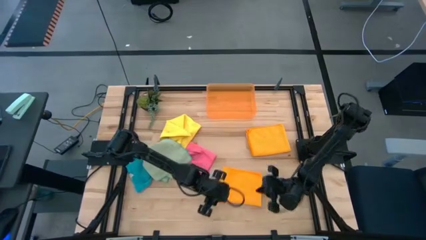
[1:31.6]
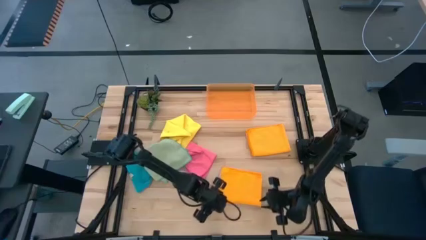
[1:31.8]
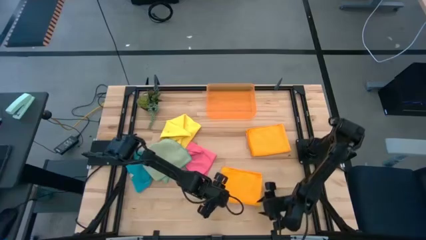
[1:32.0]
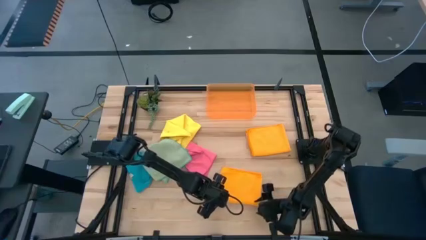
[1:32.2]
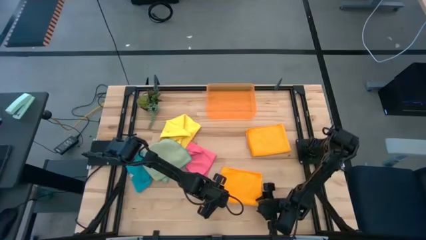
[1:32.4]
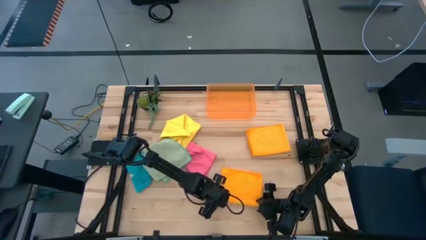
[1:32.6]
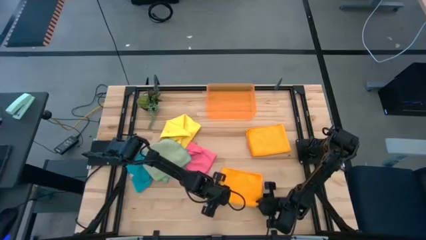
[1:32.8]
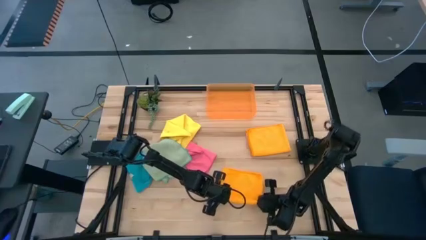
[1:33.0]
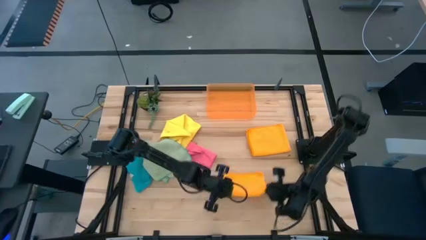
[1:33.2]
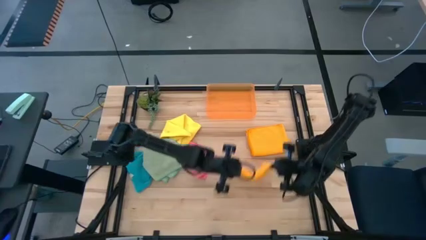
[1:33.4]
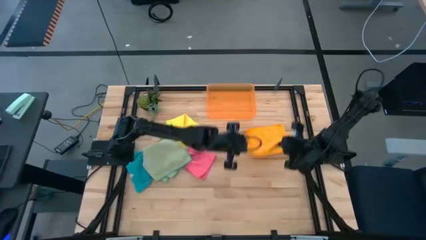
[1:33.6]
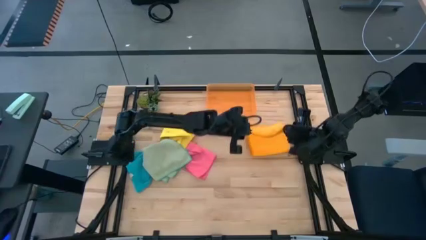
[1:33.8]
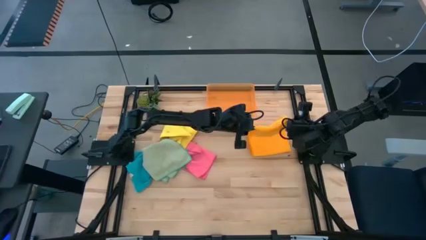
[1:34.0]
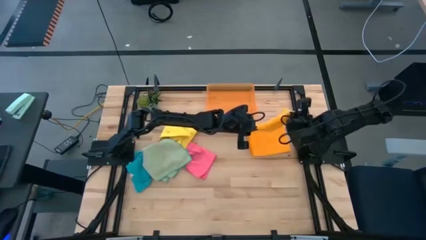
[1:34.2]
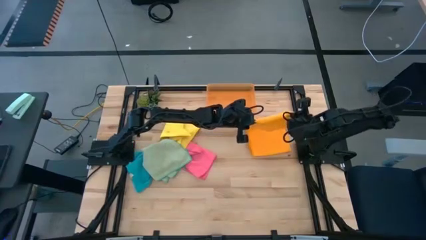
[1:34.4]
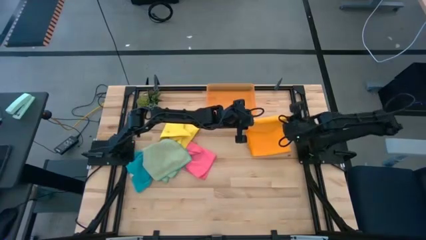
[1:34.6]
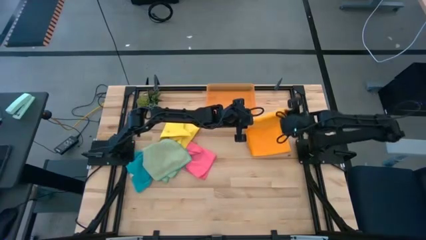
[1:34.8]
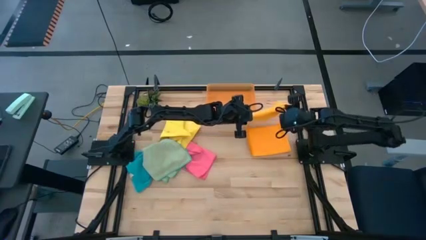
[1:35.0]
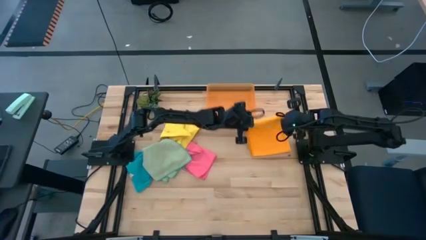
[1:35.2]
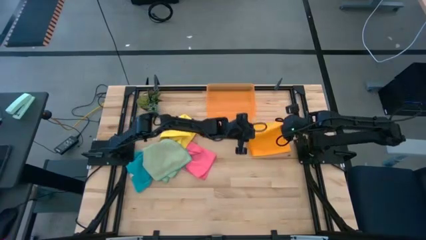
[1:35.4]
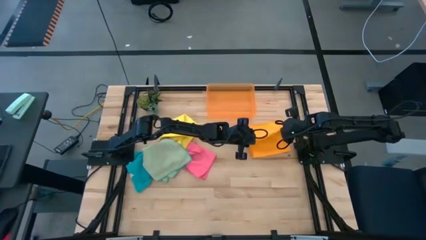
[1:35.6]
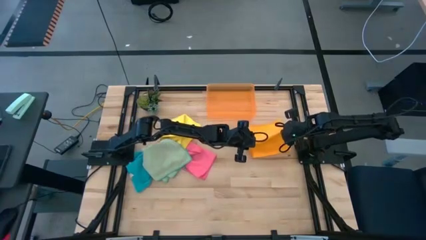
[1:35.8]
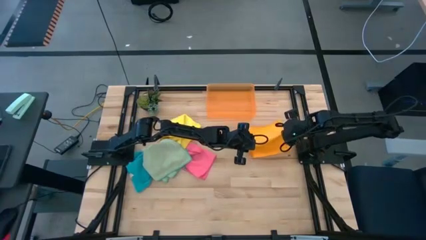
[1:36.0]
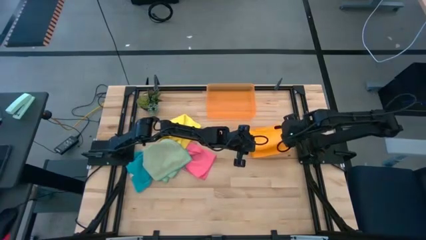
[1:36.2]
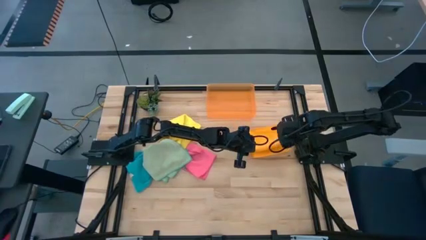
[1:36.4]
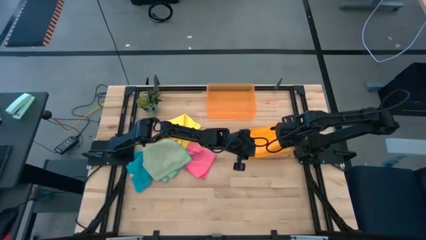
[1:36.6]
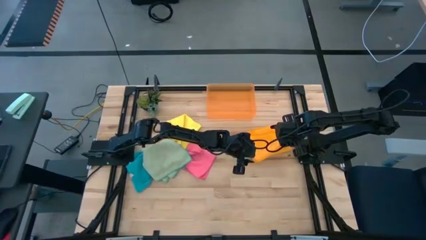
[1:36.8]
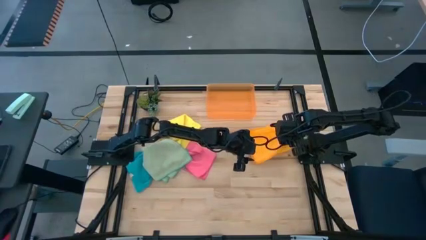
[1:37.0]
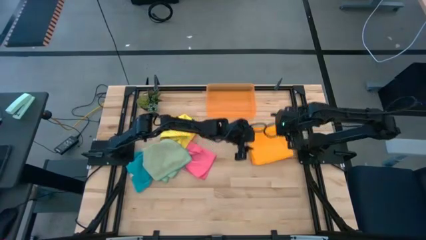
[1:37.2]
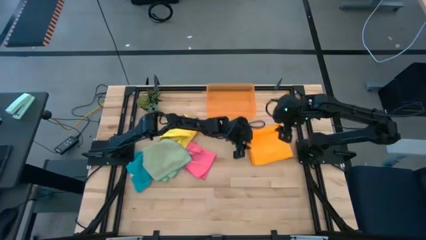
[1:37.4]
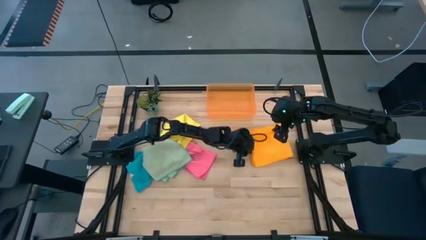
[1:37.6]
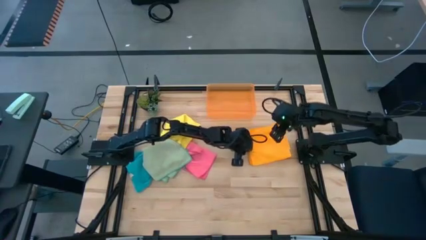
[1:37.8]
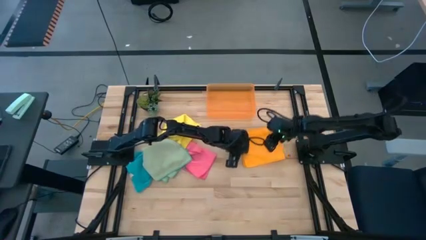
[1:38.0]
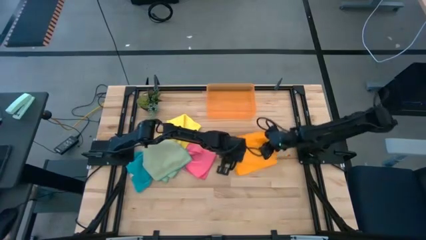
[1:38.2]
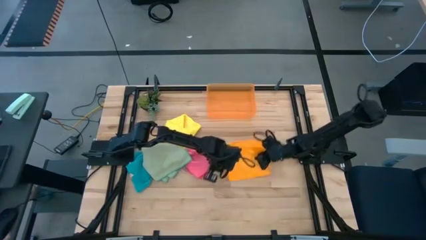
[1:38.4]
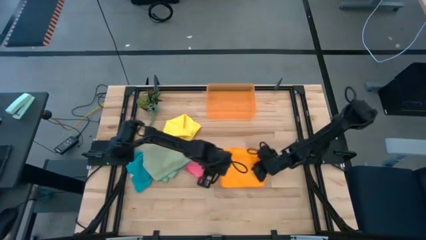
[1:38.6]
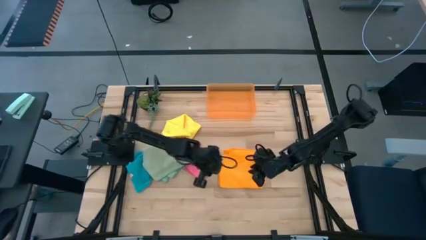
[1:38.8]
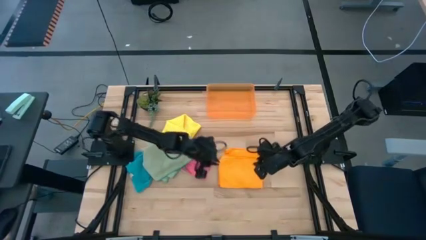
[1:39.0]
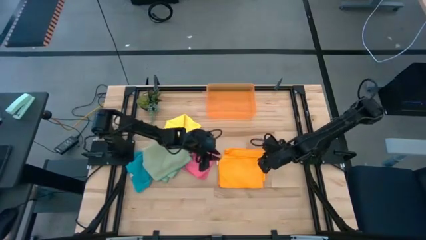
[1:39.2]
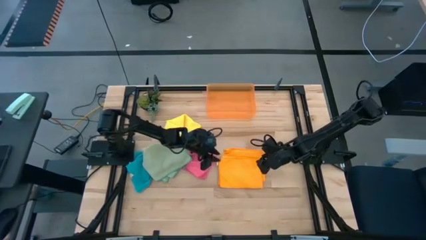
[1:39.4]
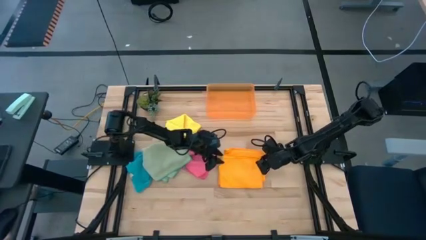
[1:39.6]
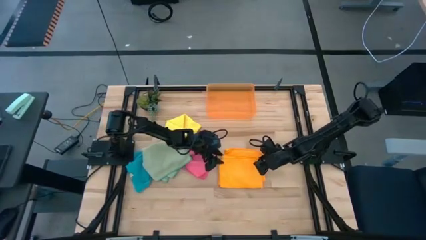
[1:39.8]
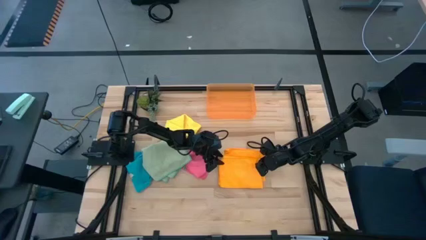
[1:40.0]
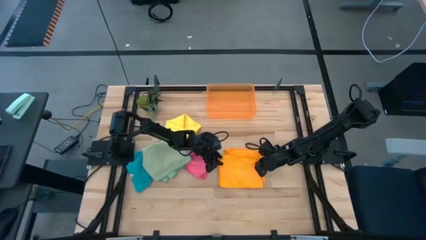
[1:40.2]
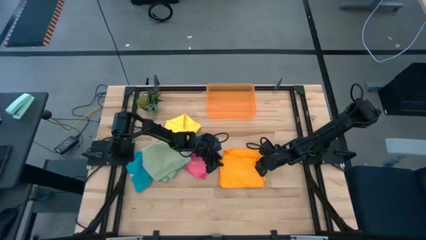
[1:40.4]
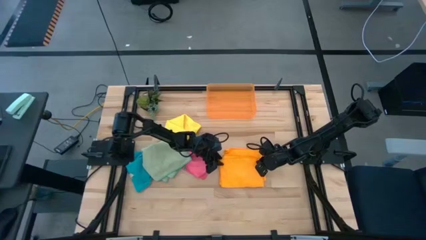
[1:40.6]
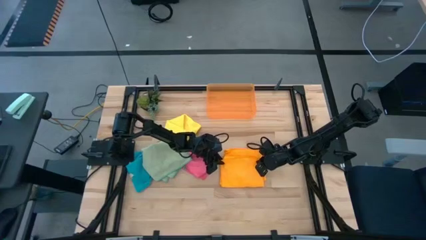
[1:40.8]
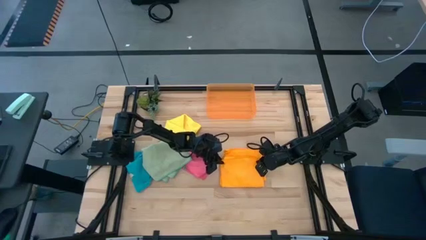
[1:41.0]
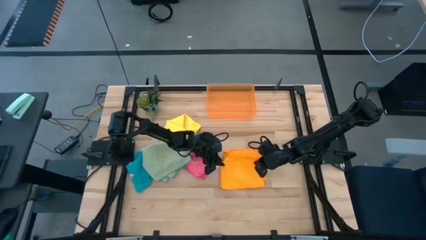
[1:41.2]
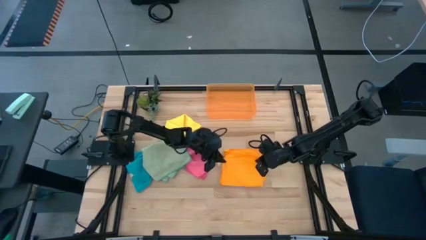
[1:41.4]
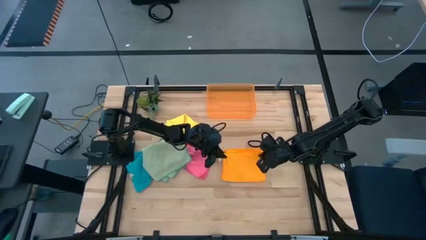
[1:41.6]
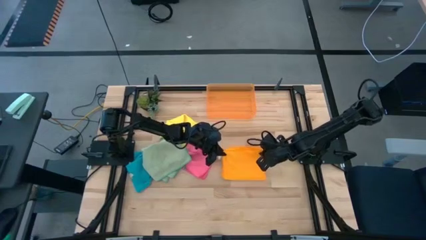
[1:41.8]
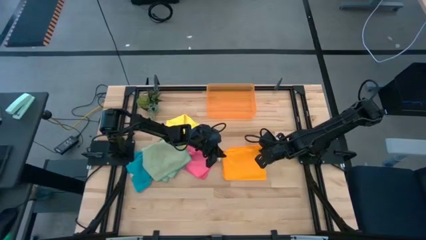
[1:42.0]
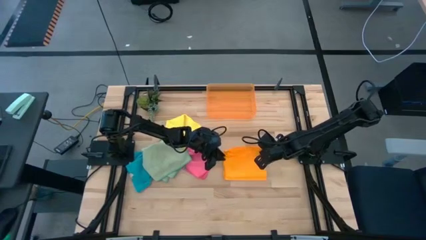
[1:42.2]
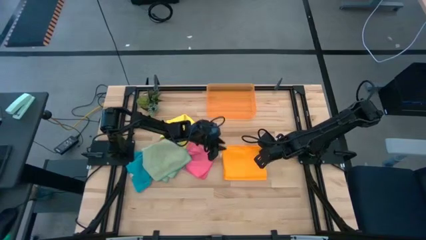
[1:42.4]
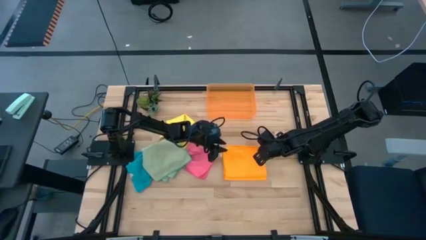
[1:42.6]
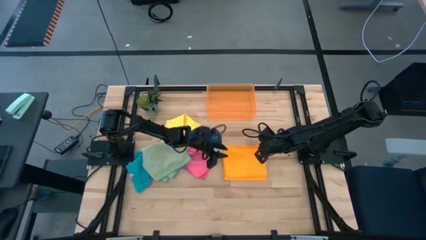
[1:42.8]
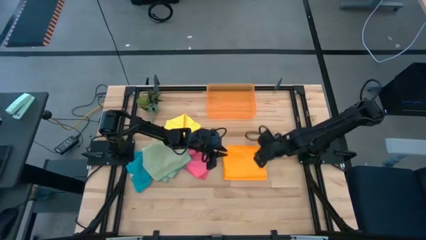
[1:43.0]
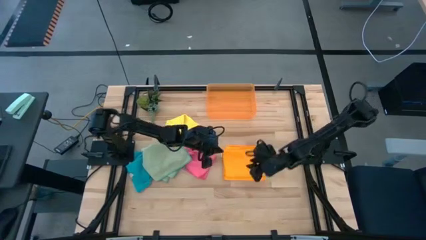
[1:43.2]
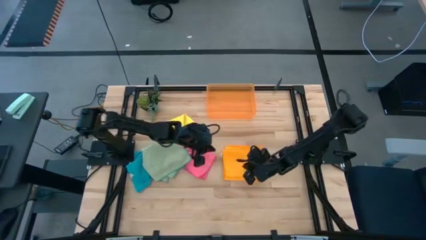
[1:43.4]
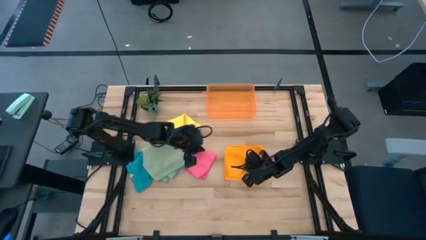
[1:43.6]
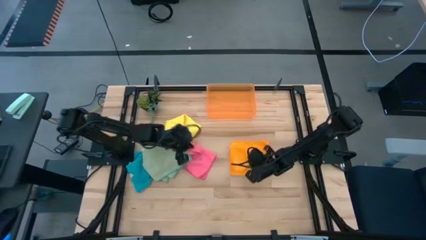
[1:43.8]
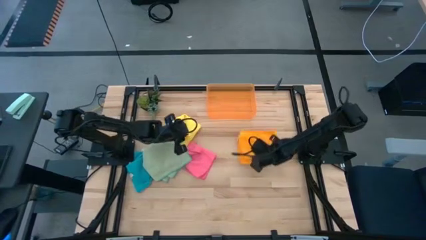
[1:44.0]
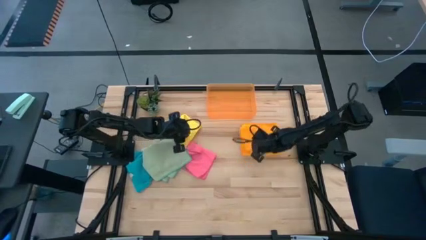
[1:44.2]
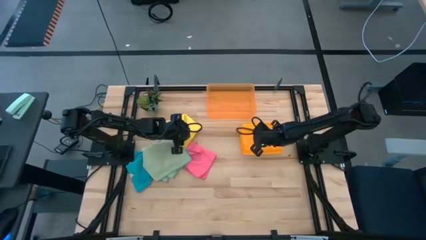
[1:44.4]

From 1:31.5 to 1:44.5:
Task: Fold microfiber towels
Stack the orange microfiber cloth on top of the orange microfiber cloth

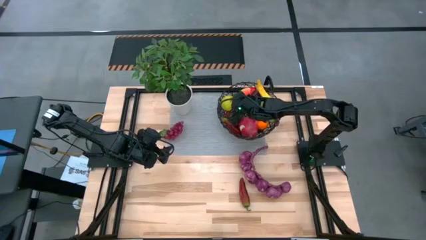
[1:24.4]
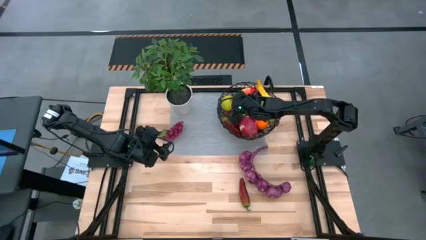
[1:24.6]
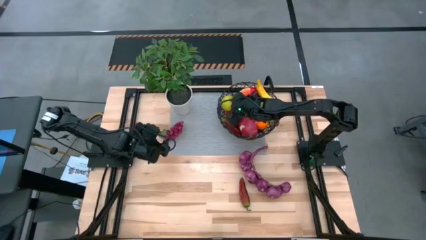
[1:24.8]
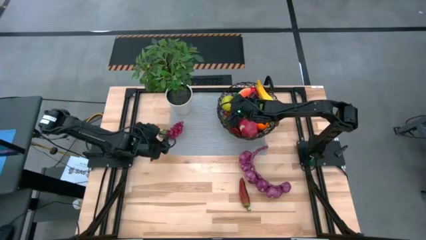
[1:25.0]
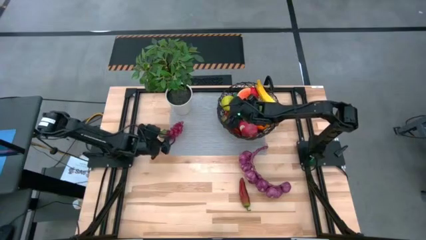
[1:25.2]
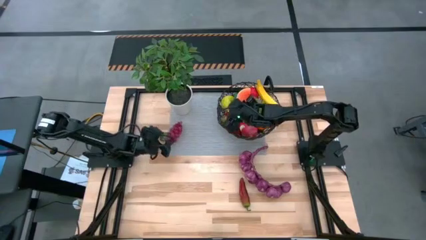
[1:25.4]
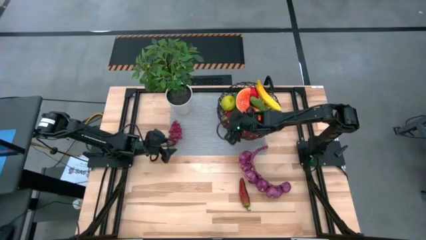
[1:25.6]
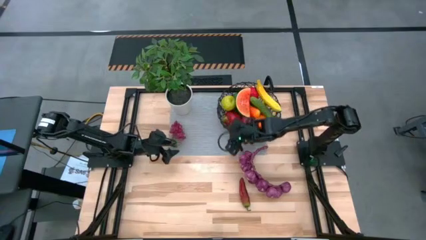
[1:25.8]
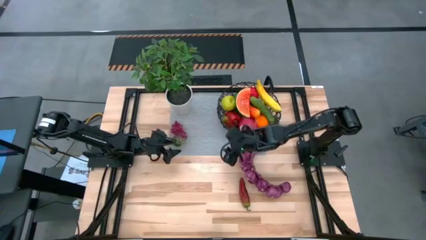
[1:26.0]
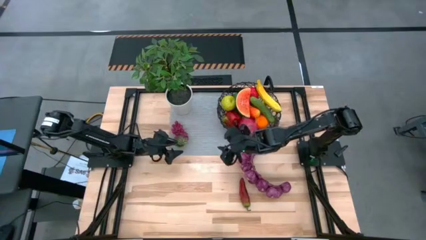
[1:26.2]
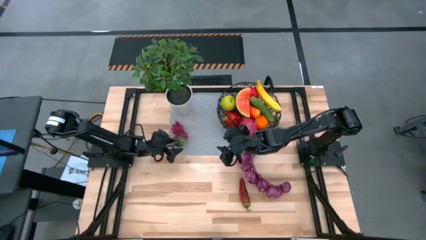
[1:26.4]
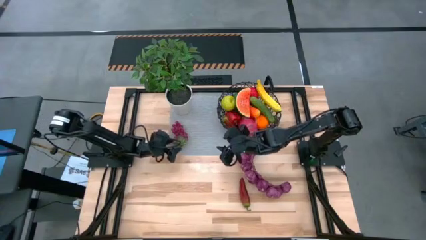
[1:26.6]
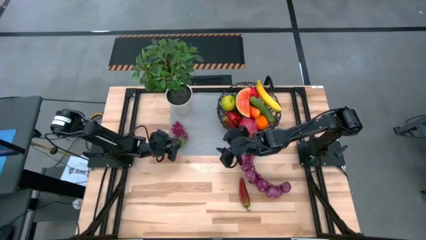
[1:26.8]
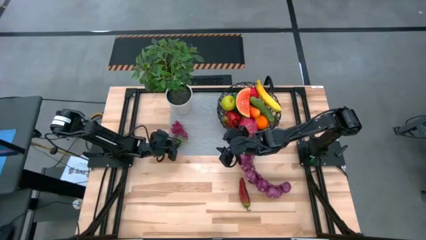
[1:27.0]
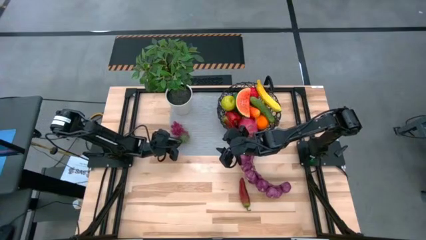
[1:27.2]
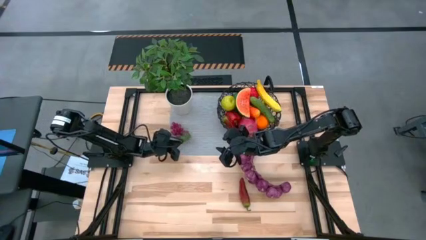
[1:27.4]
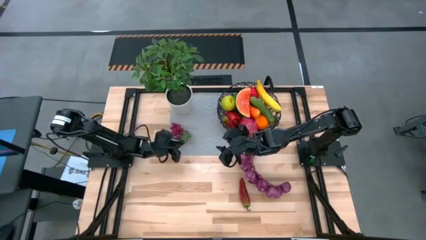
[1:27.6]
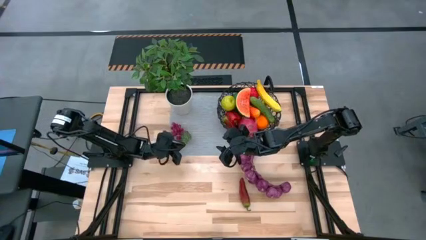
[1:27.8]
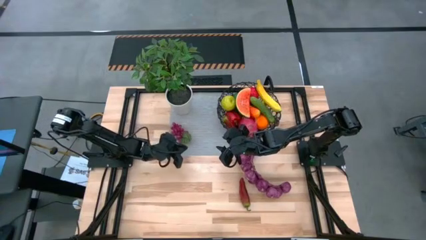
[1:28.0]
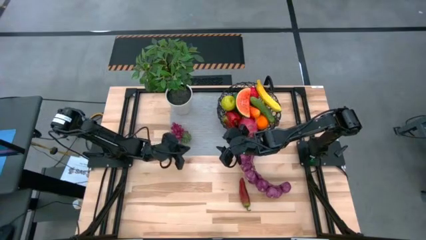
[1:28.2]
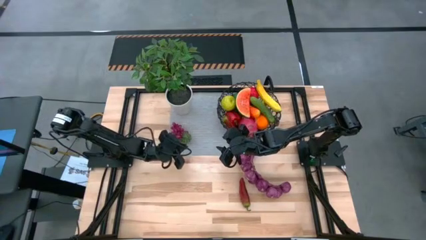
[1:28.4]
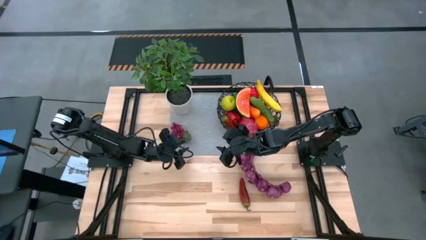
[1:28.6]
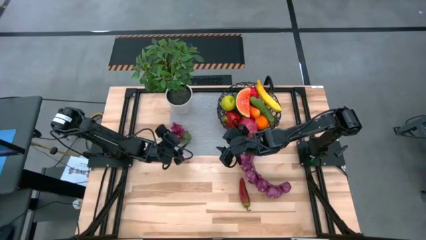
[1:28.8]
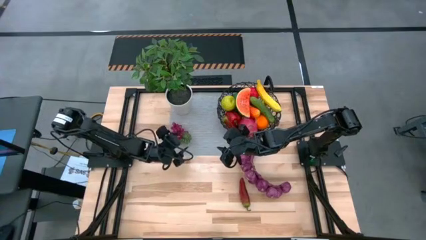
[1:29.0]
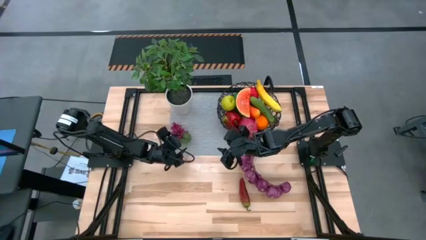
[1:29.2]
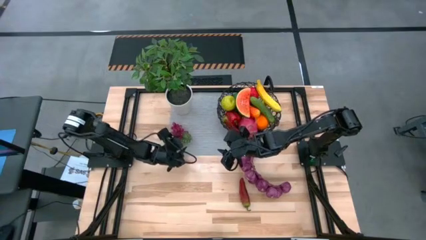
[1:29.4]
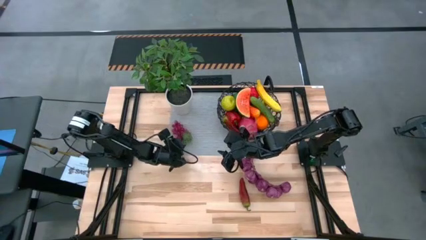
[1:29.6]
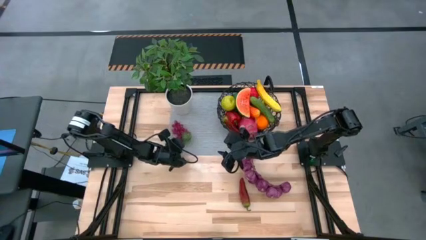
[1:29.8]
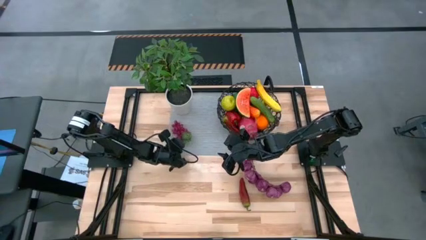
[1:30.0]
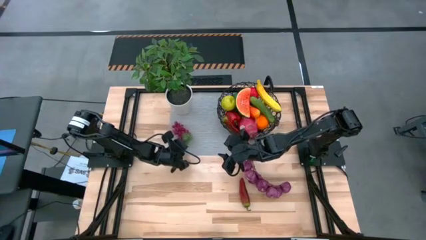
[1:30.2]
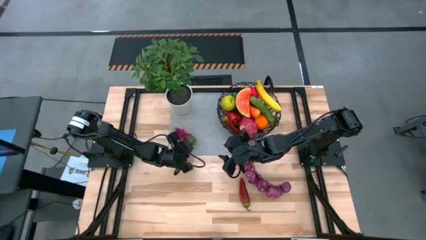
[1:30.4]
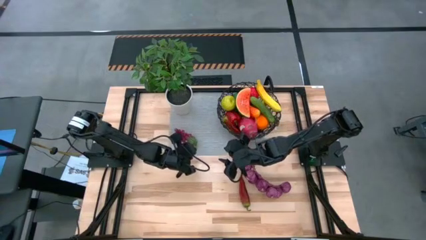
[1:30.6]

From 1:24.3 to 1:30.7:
Task: Build produce basket
Put the grapes into the wire basket
